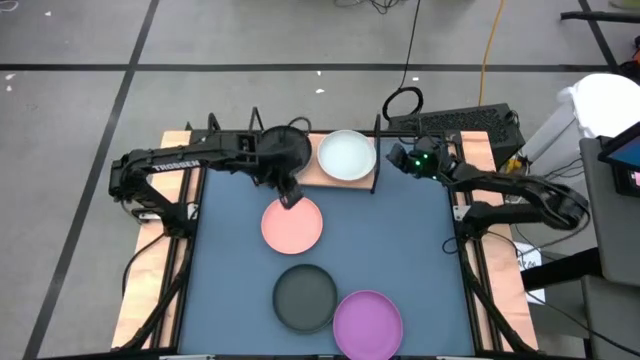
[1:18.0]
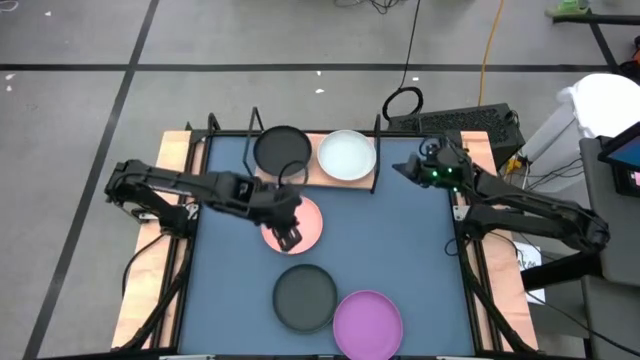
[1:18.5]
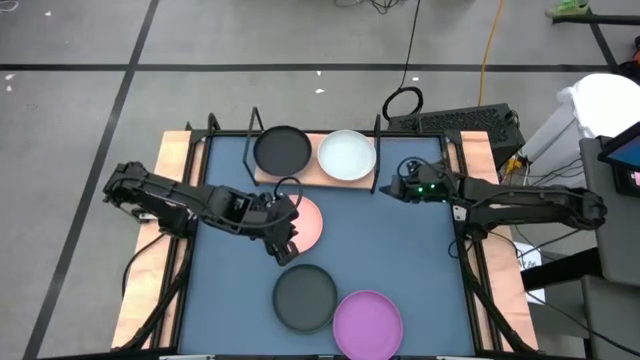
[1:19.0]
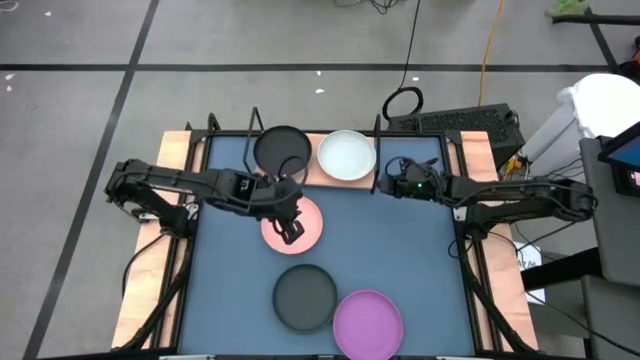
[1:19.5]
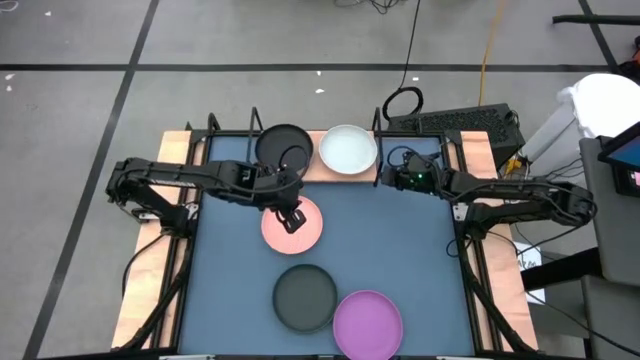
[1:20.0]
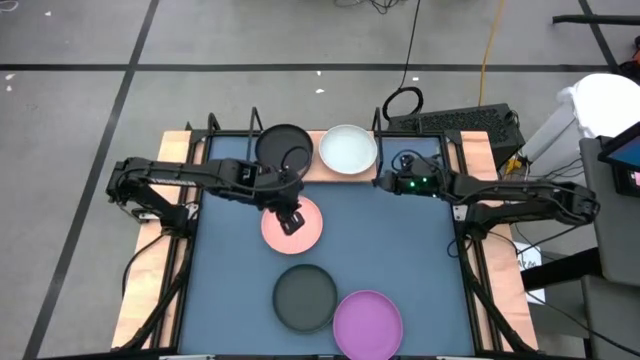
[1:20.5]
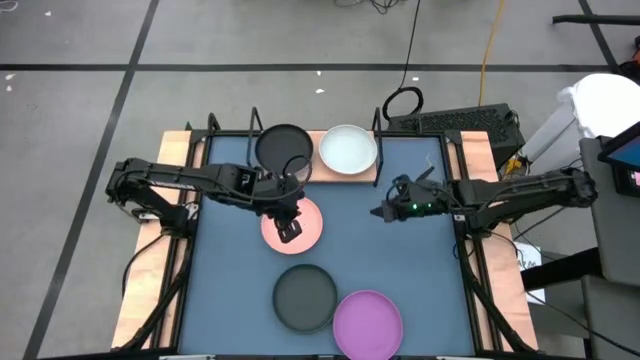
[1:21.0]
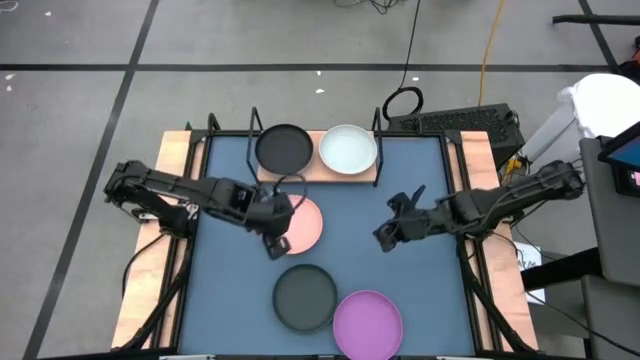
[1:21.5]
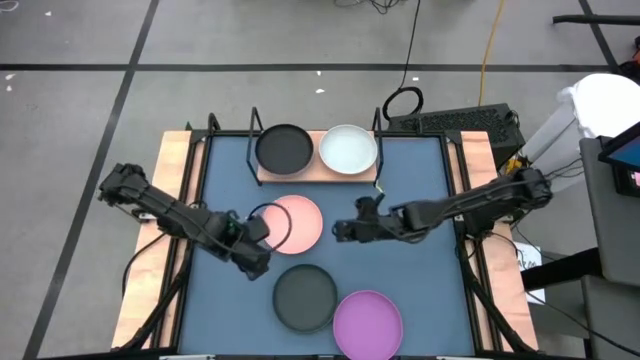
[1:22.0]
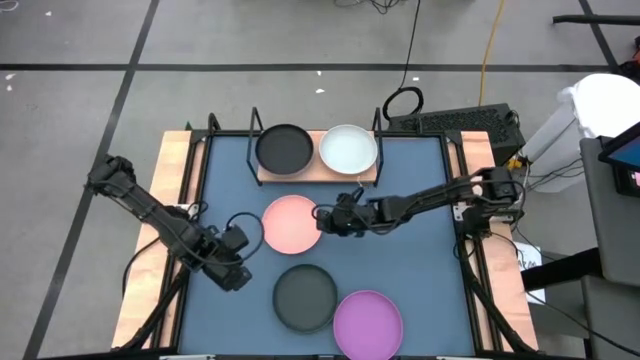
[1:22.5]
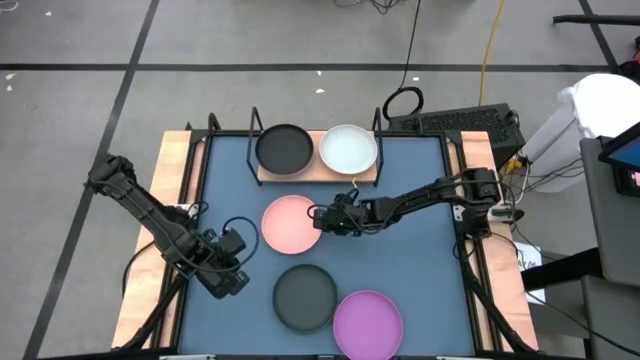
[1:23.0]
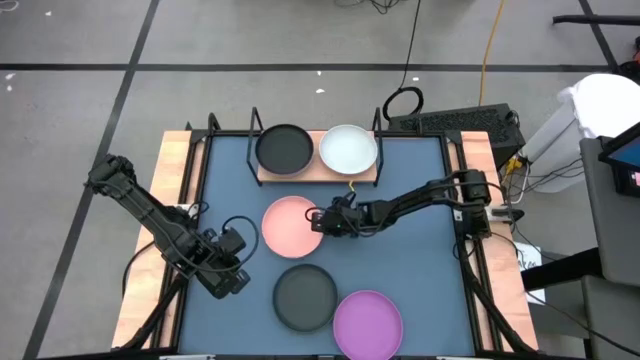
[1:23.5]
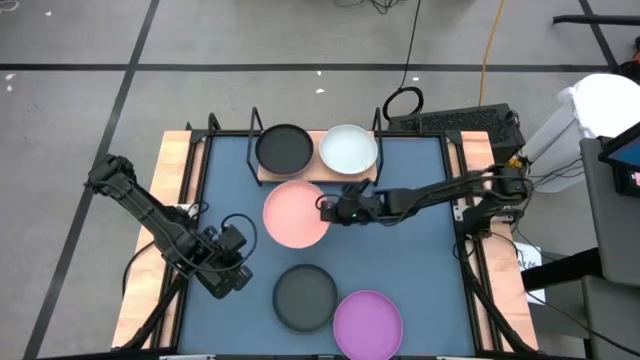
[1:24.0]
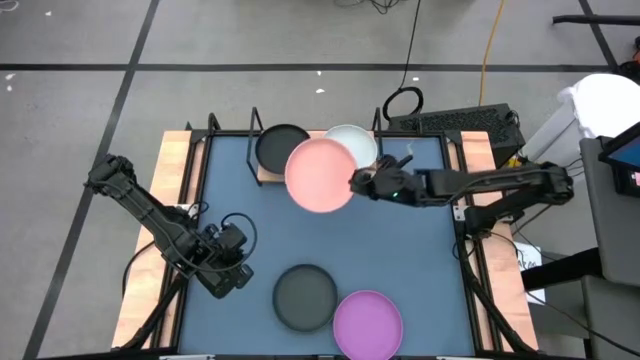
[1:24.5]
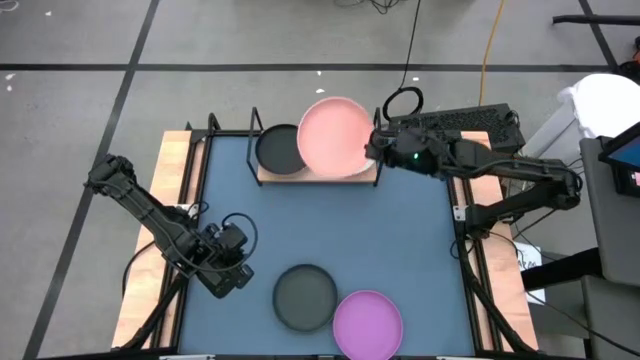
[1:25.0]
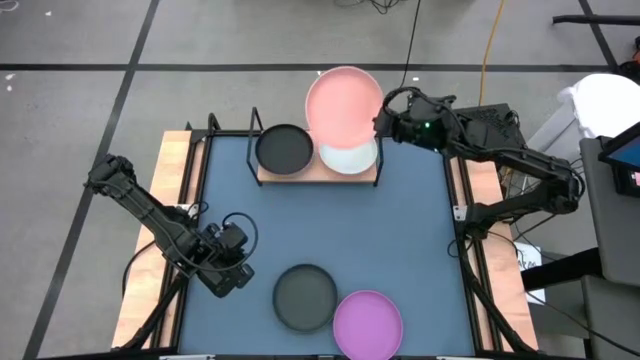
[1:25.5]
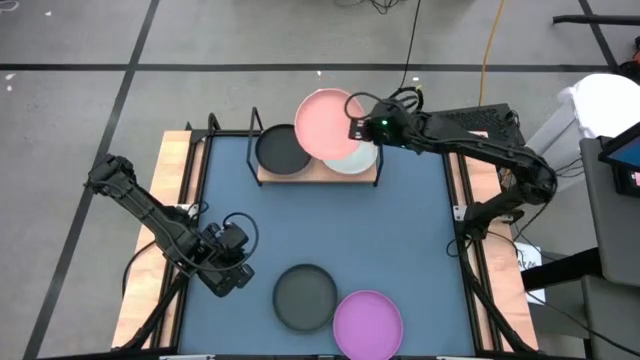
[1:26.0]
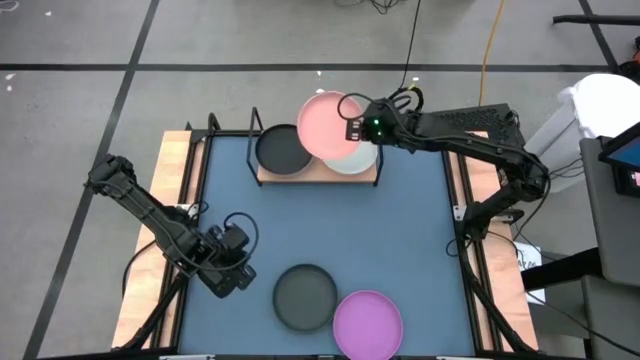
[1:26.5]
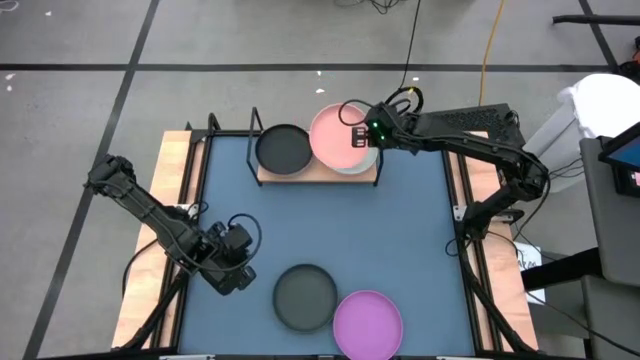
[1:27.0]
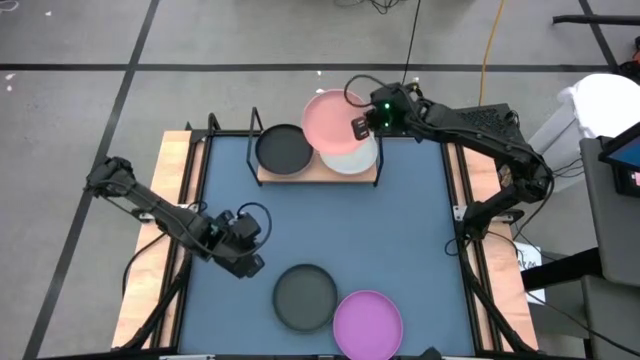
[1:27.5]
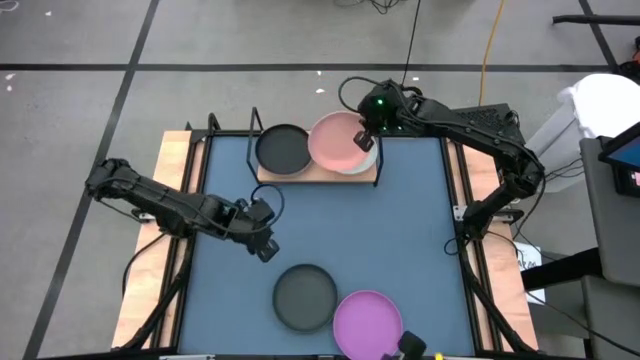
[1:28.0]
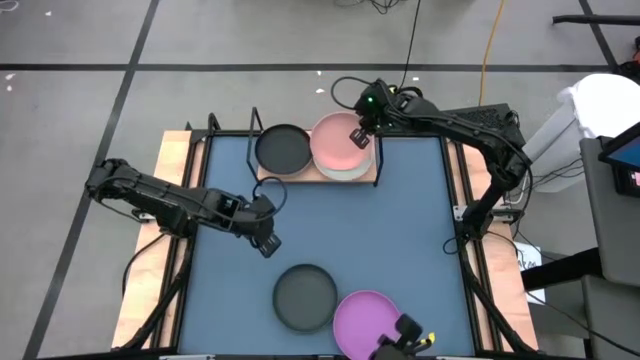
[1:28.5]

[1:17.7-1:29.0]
Task: Place and stack plates onto a shelf
Stack the pink plate on top of the gray plate

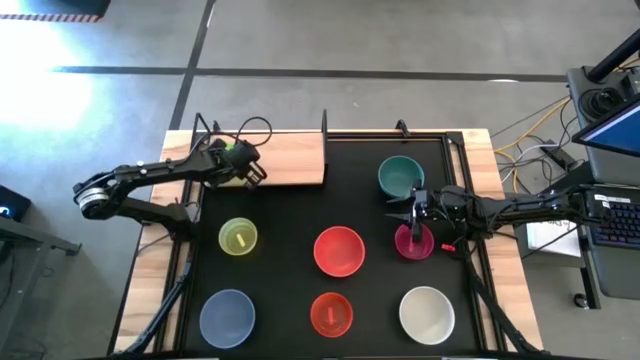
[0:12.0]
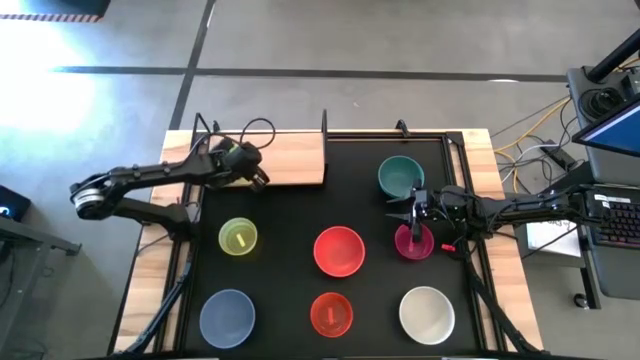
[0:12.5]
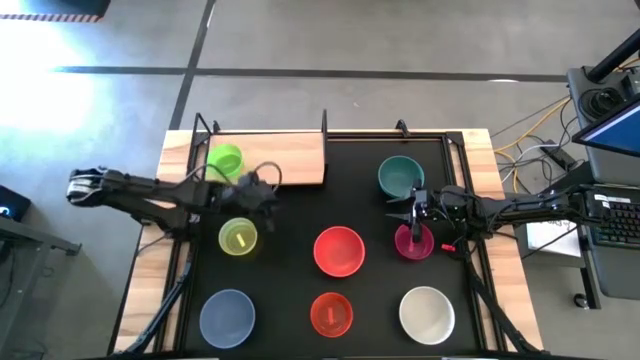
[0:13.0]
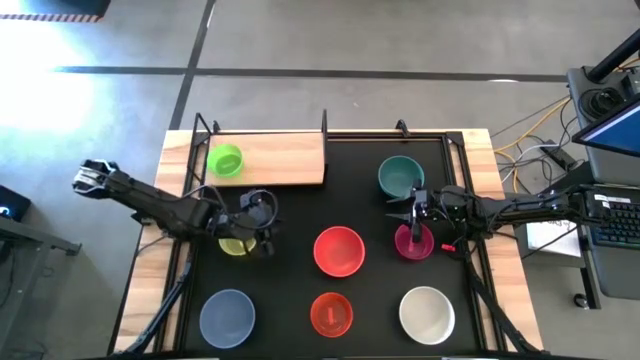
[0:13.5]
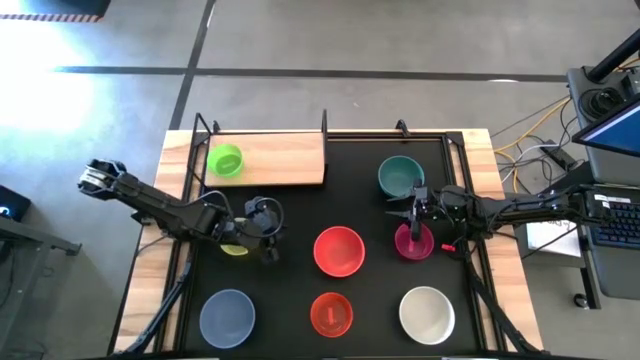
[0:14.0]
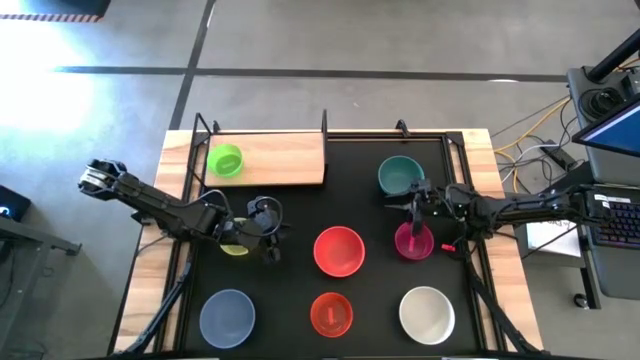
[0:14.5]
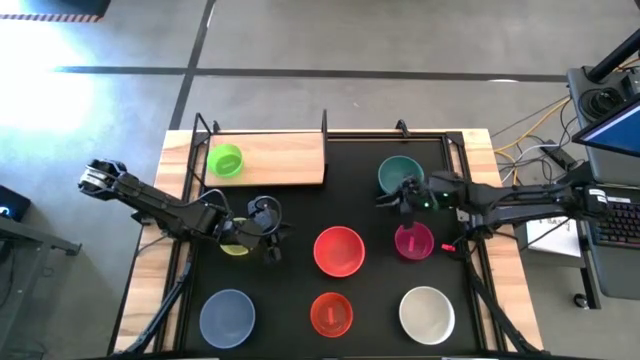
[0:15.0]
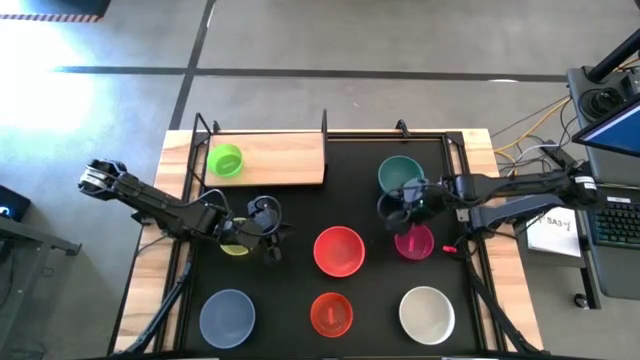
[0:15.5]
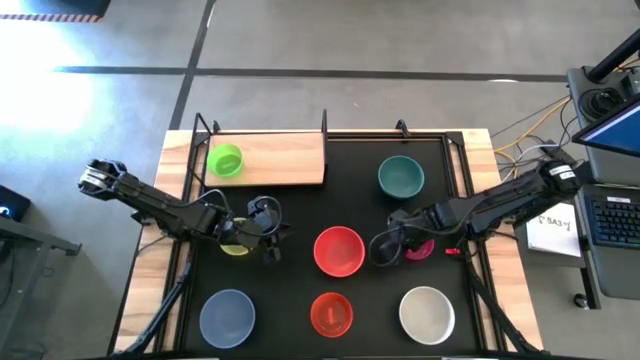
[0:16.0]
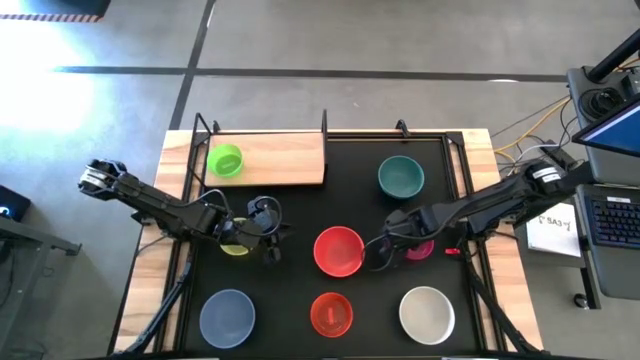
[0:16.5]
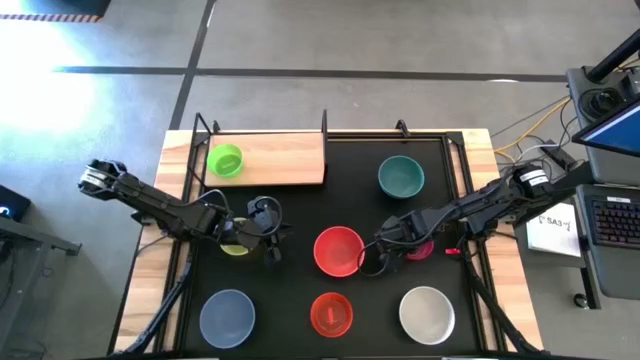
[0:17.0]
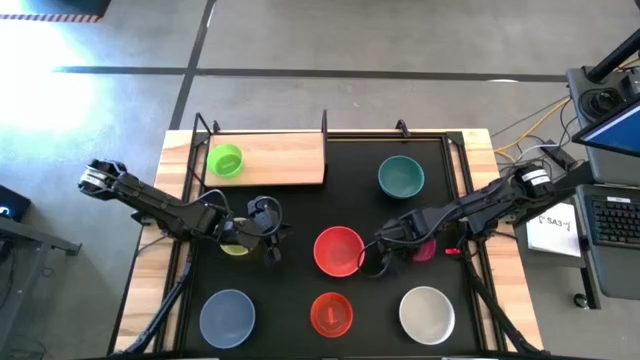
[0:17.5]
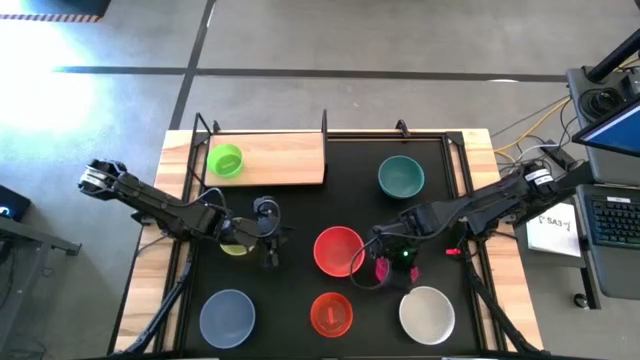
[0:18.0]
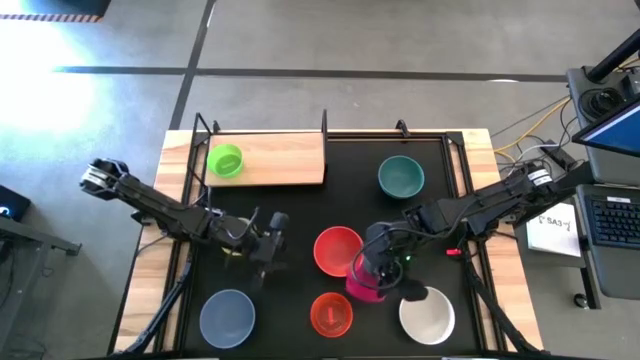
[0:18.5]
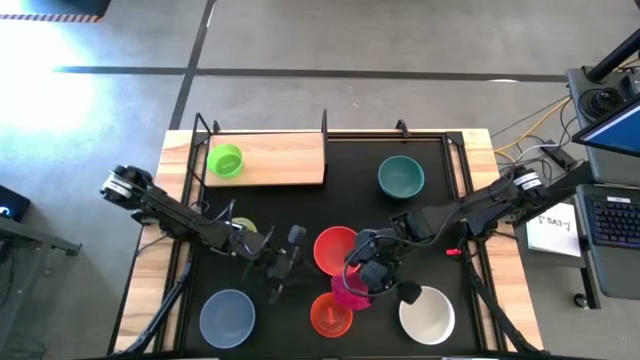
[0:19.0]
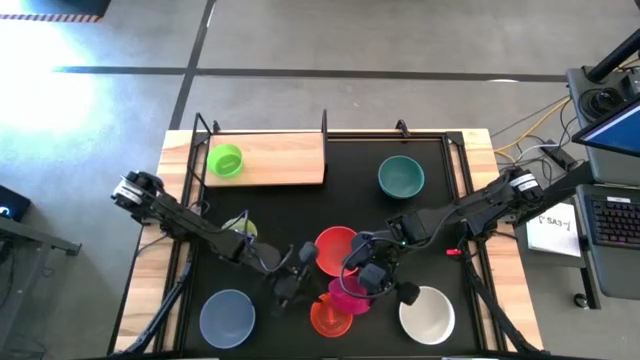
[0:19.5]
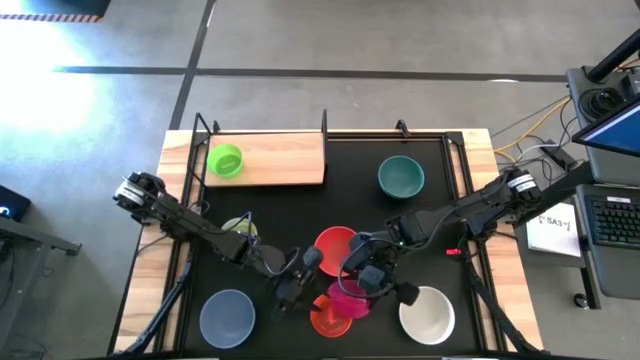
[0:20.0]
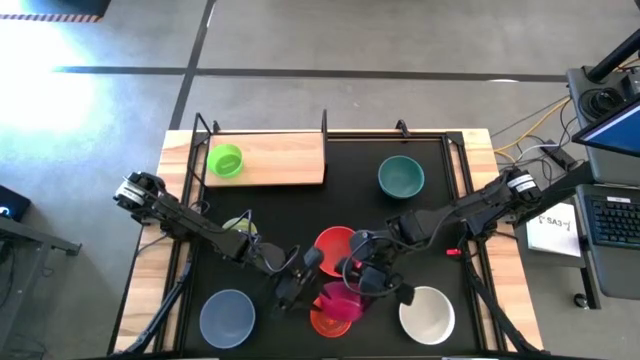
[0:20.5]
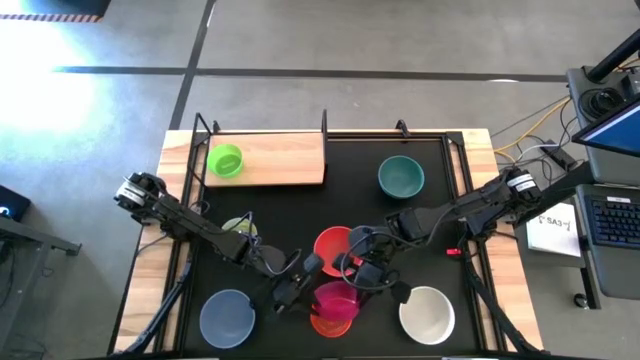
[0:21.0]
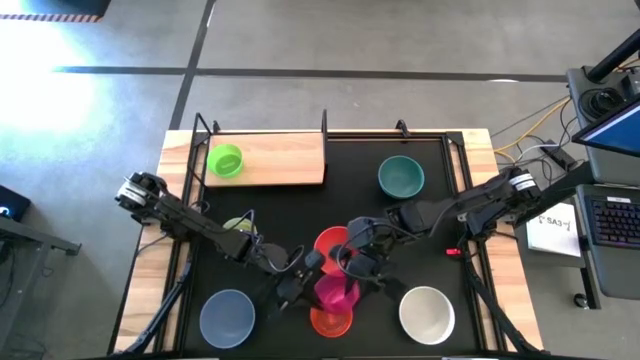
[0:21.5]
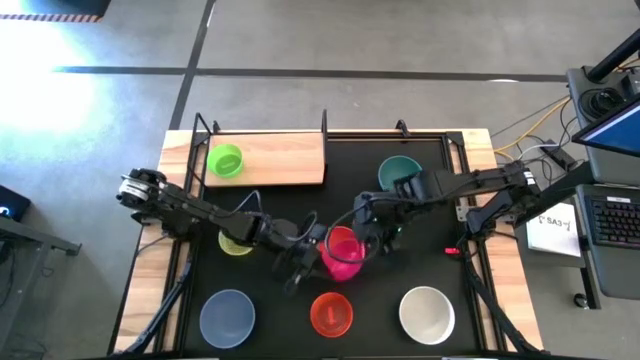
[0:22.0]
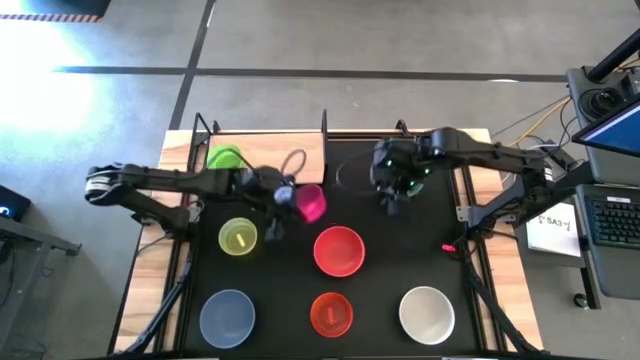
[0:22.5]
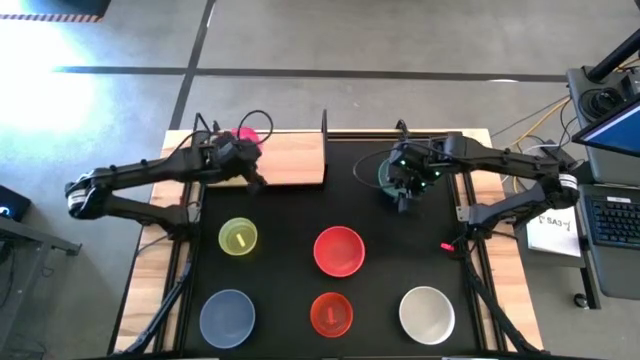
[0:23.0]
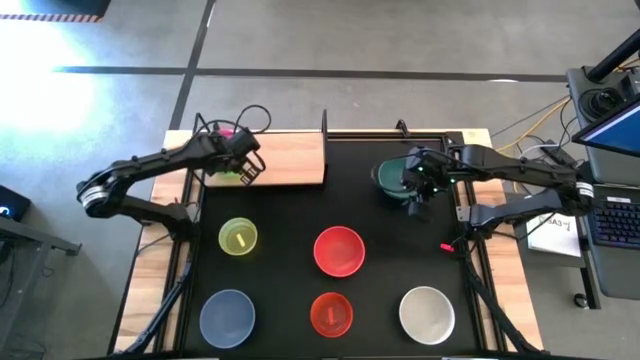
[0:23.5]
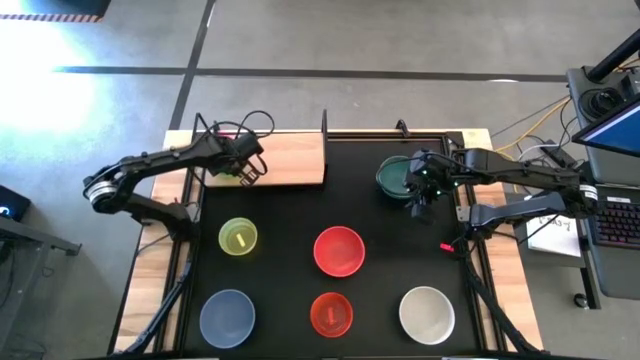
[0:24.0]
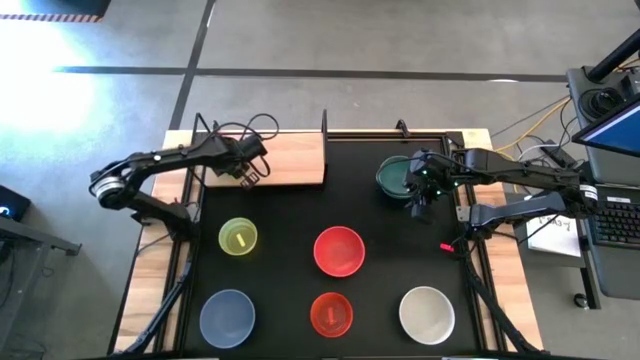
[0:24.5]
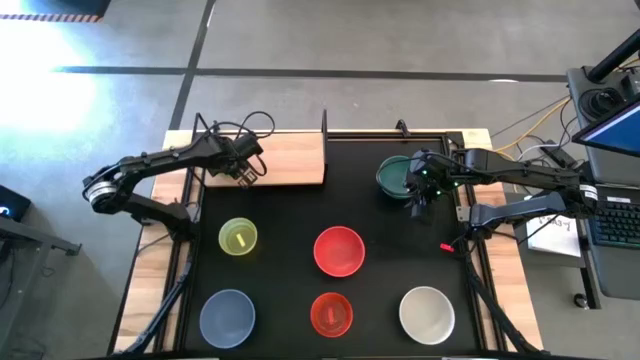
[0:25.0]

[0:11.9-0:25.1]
Task: Place and stack bowls onto a shelf
Stack the small pink bowl onto the green bowl on the shelf
